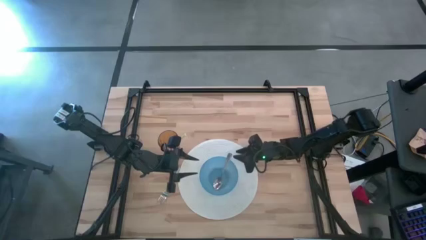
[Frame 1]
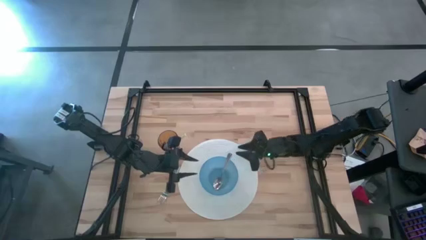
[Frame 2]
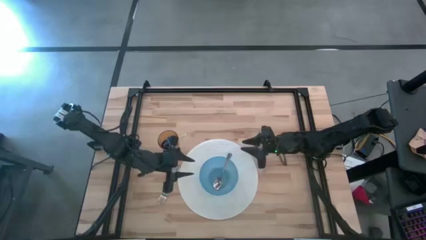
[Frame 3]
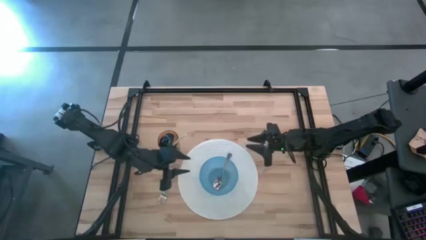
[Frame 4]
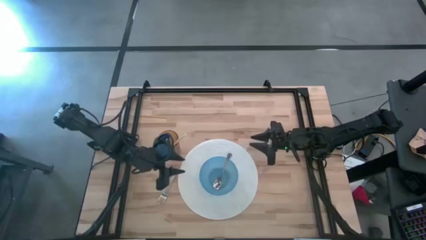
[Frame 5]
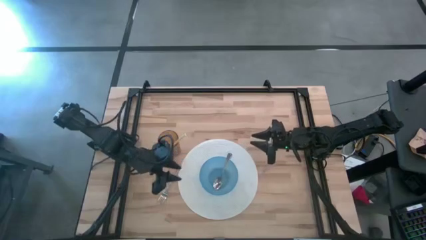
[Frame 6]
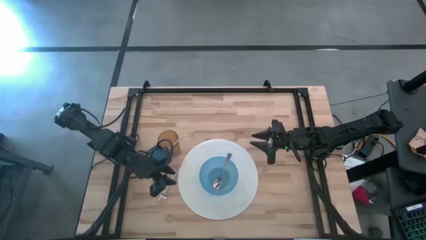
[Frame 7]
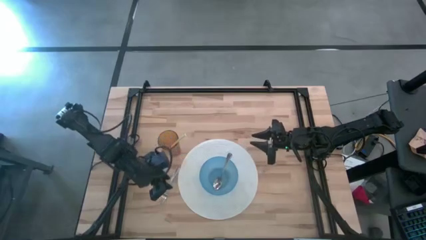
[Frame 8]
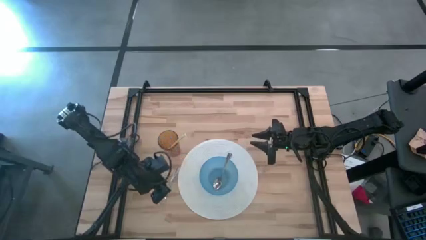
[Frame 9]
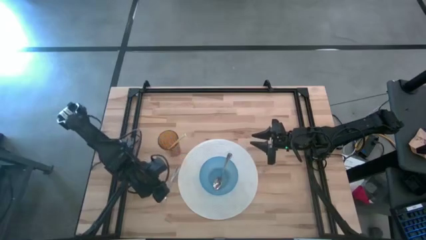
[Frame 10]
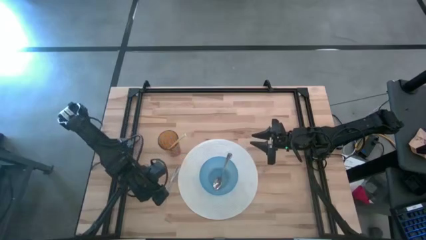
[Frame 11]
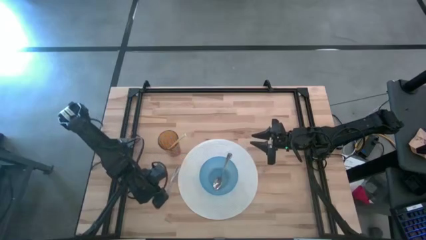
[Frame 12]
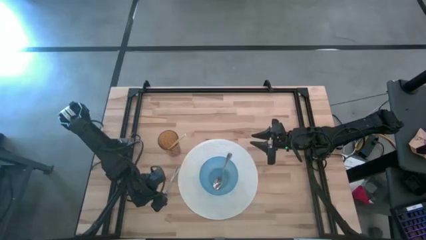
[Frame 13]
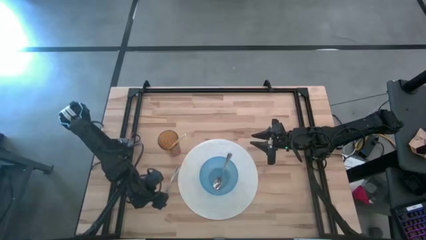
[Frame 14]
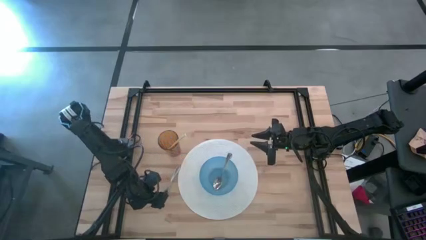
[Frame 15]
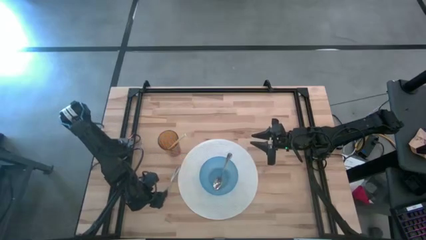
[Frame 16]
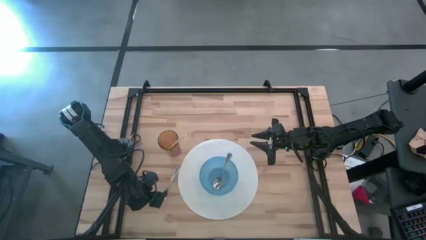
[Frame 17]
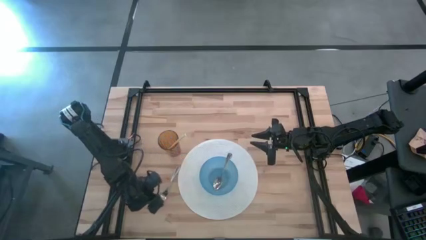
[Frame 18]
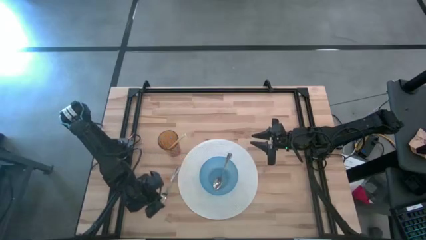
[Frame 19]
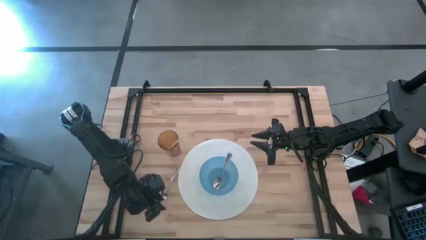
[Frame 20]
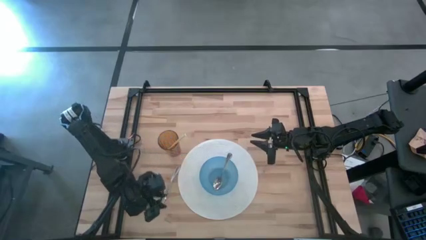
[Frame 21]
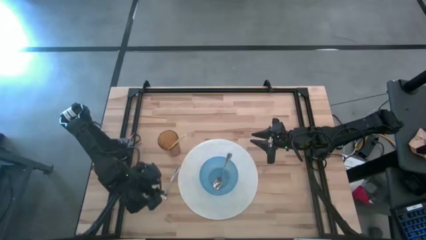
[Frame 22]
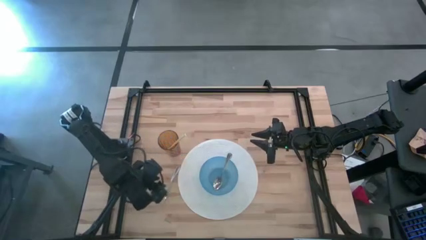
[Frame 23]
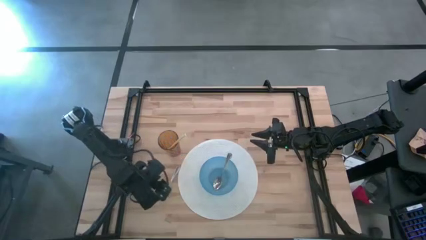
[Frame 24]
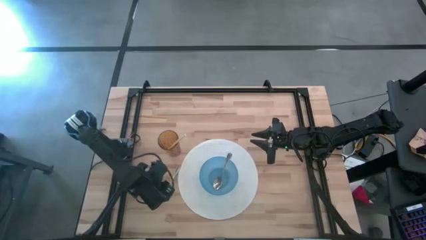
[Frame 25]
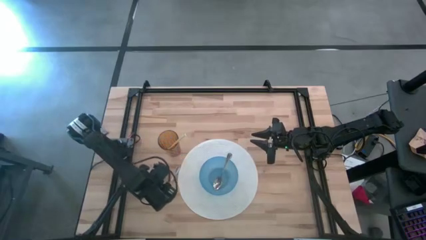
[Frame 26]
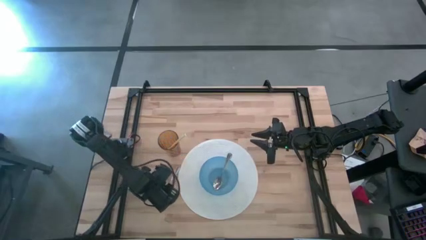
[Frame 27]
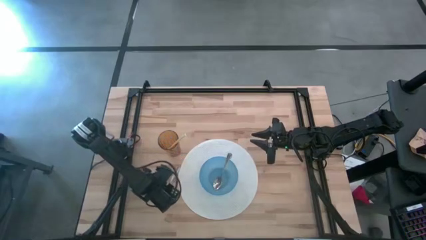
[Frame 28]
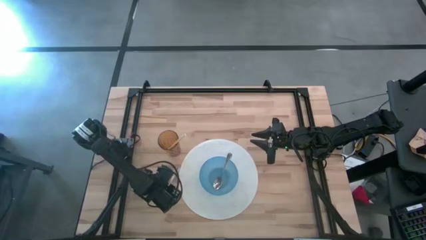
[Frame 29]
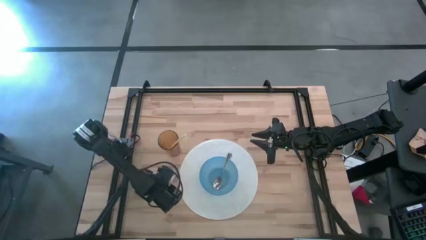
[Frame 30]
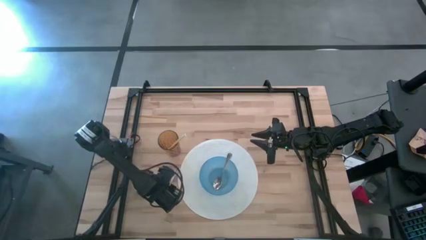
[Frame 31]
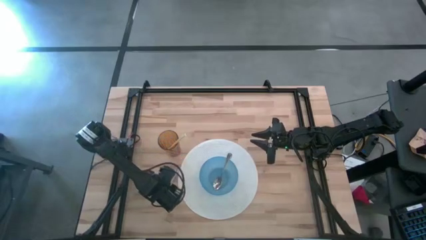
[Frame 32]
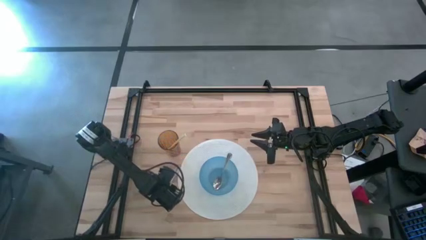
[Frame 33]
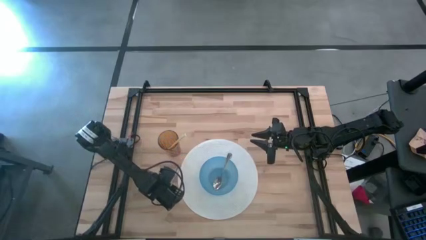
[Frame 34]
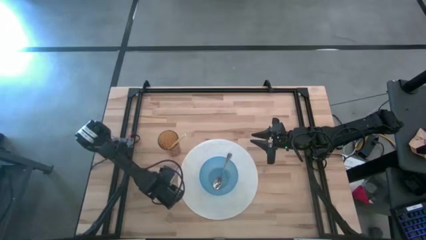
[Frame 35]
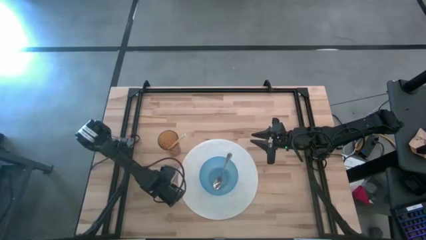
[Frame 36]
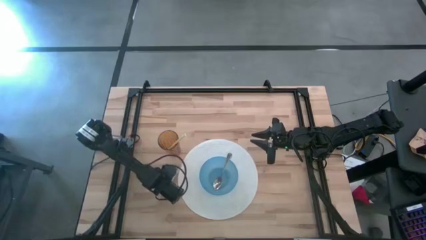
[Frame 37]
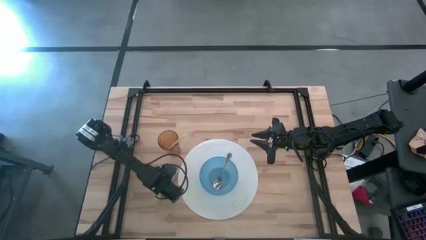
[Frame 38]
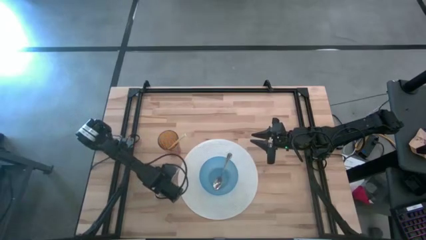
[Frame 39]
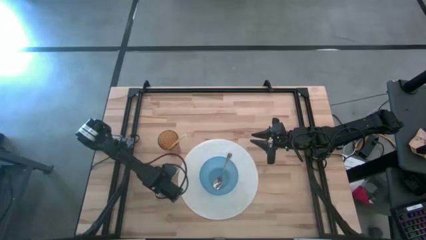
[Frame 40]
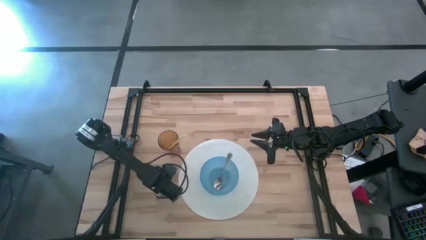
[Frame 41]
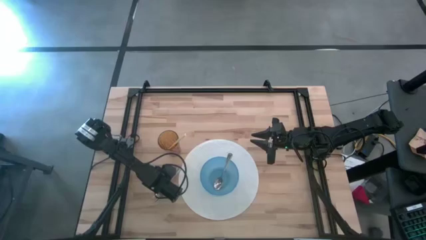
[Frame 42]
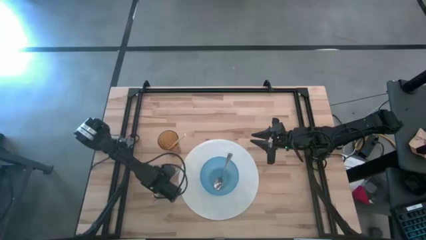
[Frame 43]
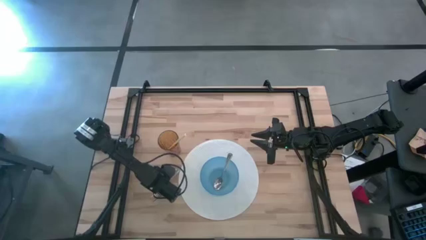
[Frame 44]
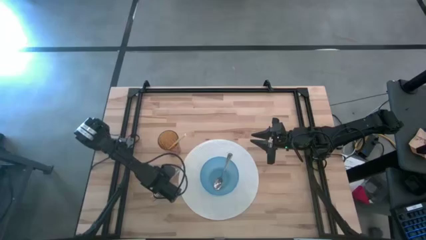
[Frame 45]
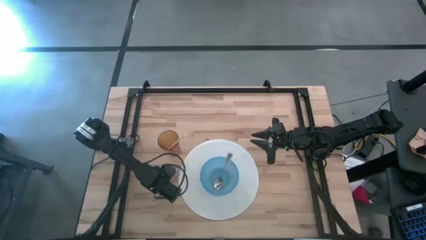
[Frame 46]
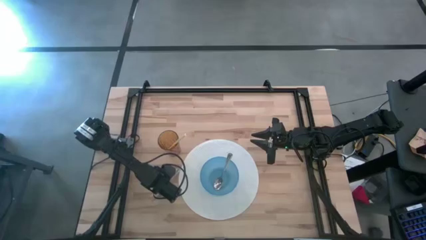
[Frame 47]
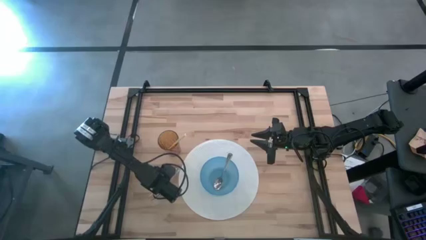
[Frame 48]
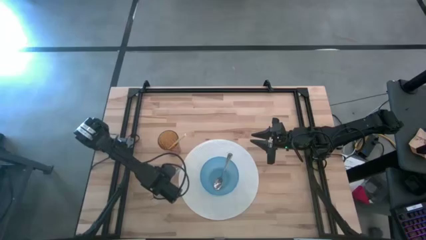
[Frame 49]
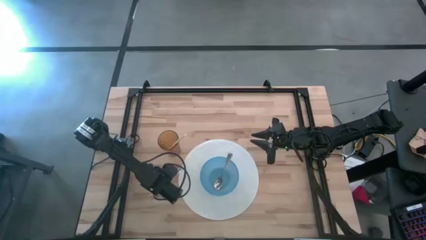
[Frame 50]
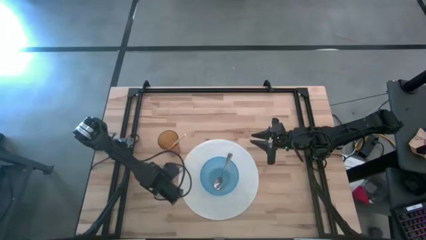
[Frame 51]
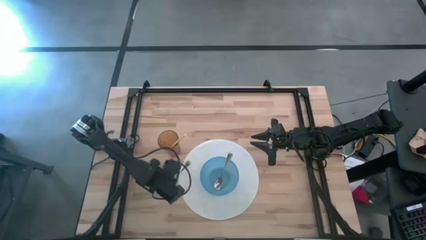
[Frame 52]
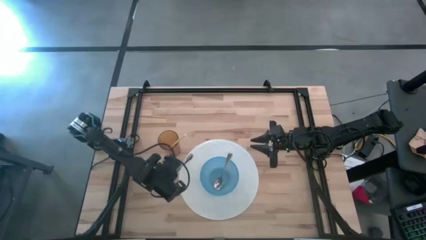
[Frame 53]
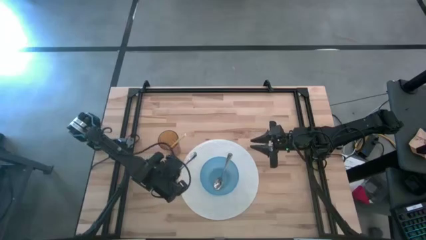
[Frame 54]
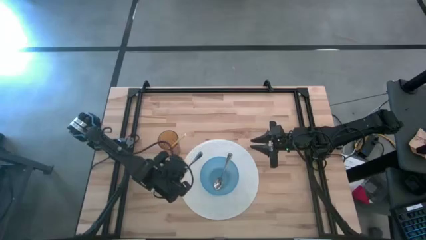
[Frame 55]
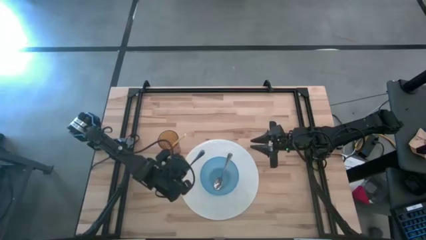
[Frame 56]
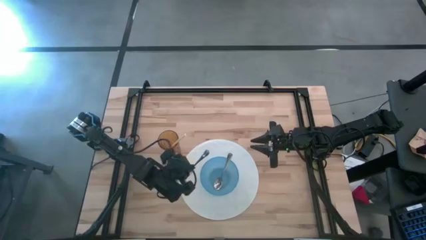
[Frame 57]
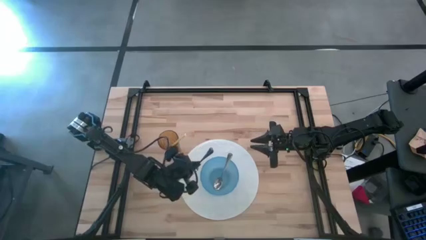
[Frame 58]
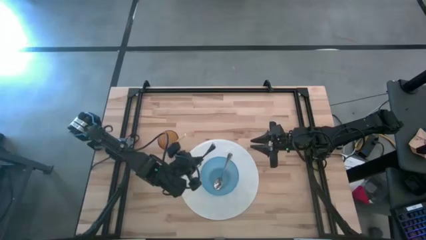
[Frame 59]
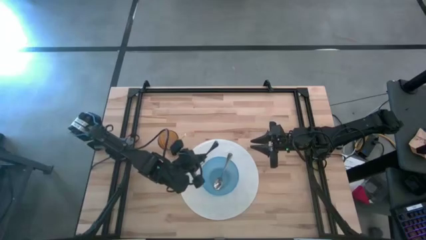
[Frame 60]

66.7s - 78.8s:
Task: Pick & Place Utensil
Put the fork into the blue bowl
